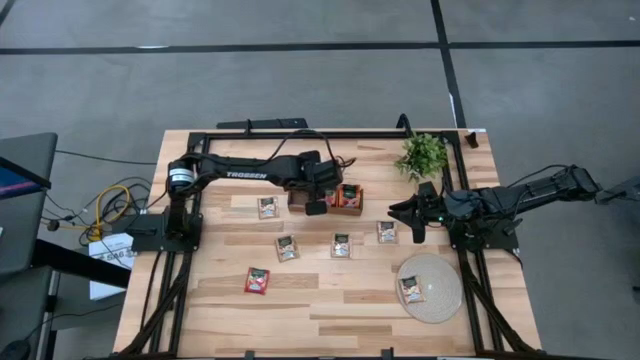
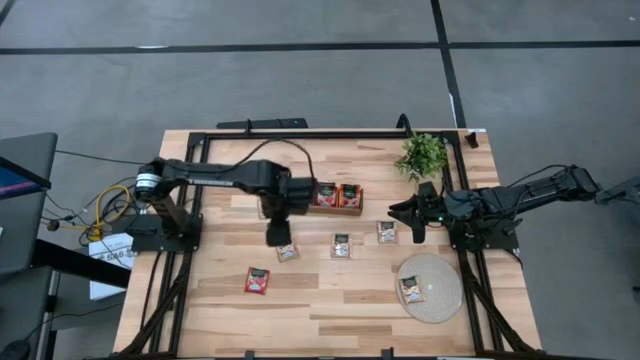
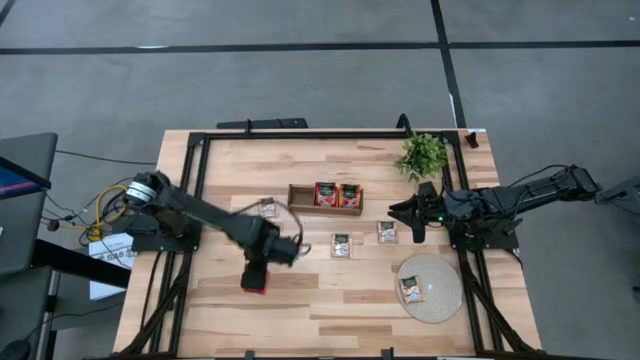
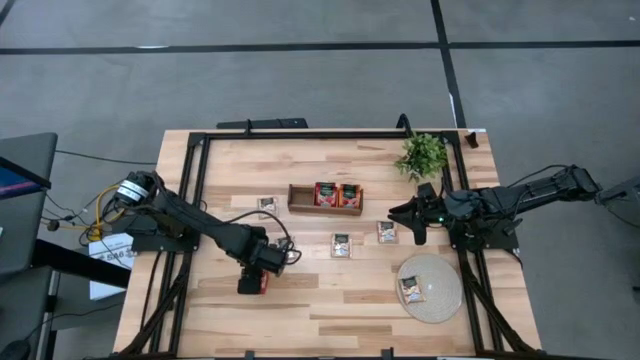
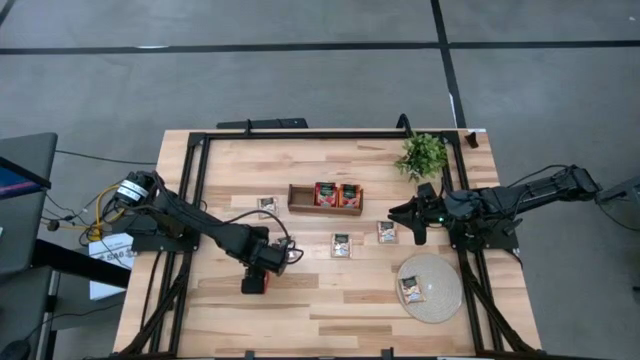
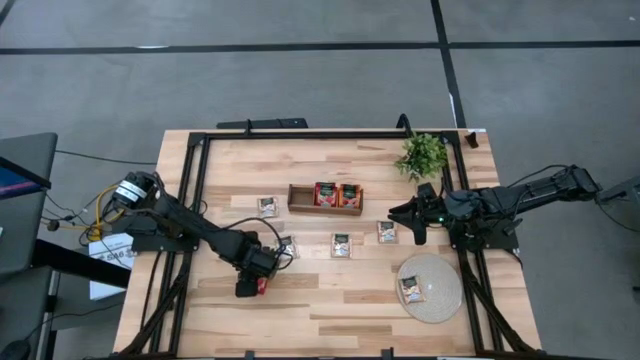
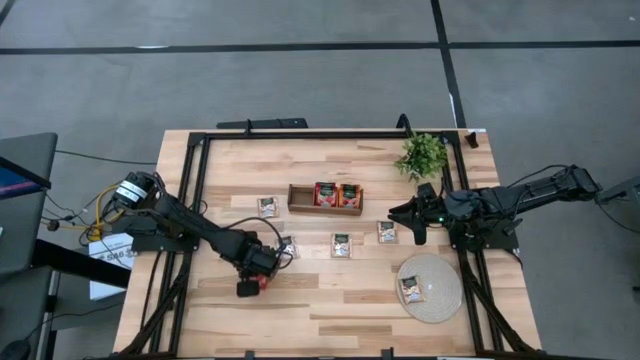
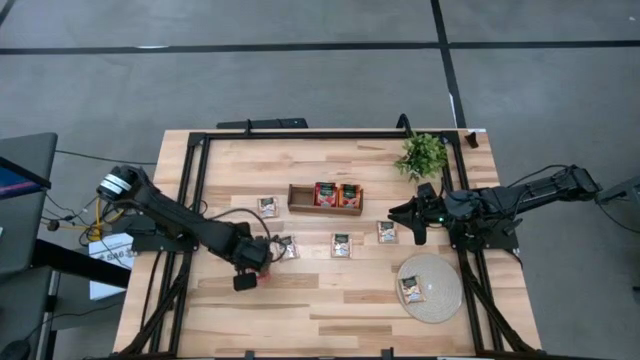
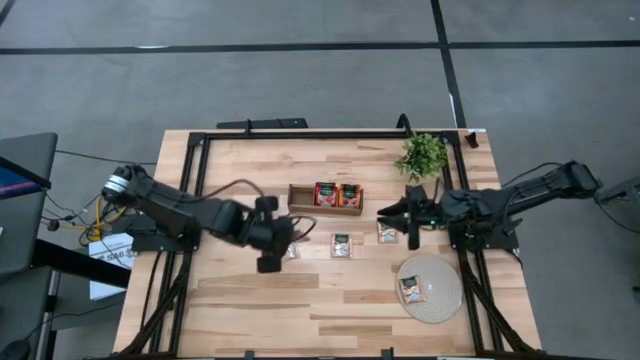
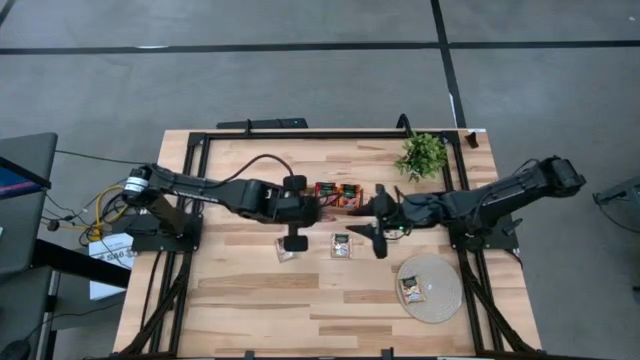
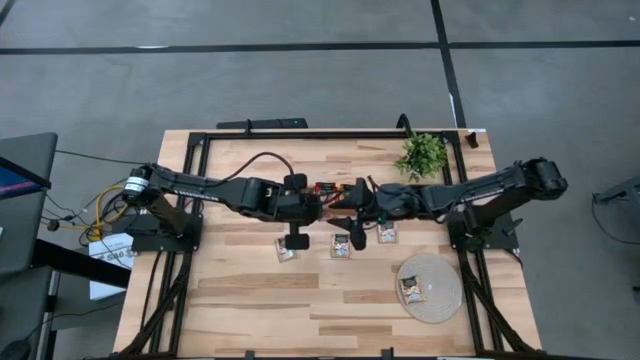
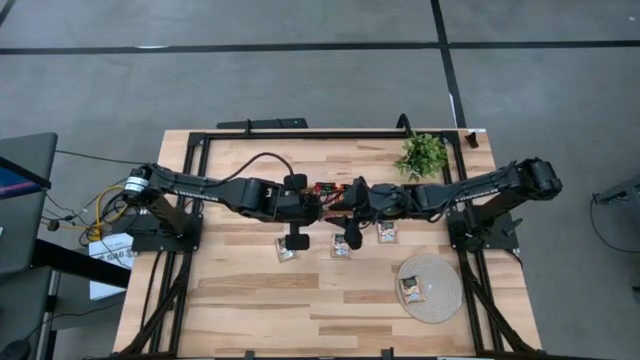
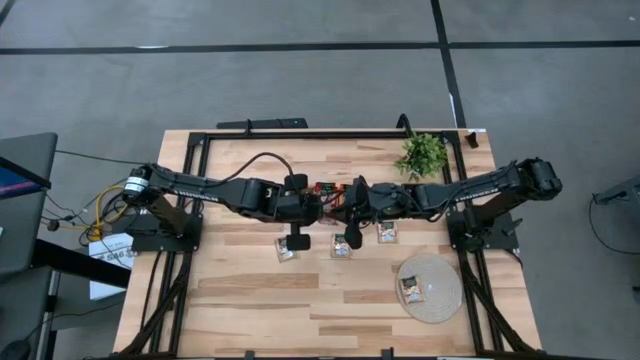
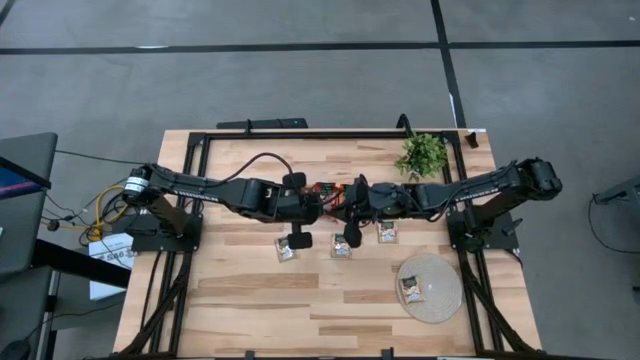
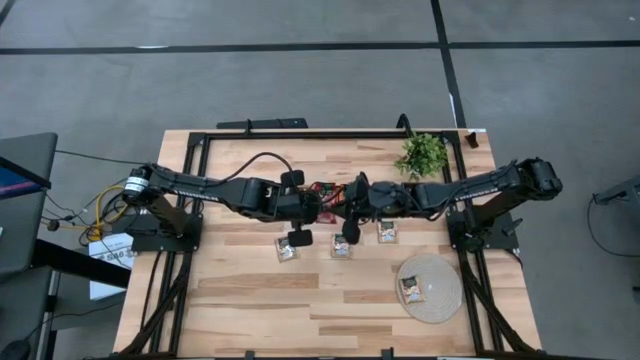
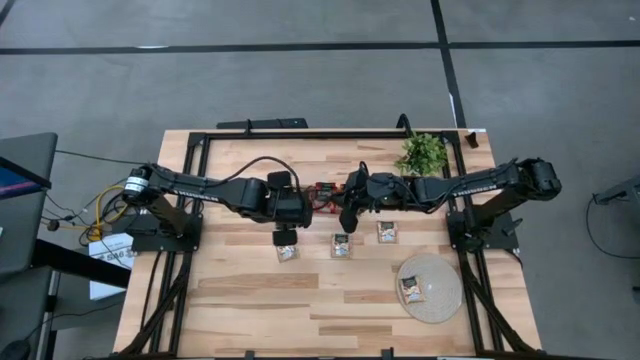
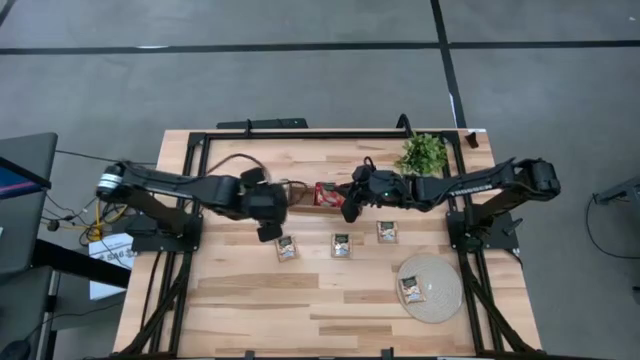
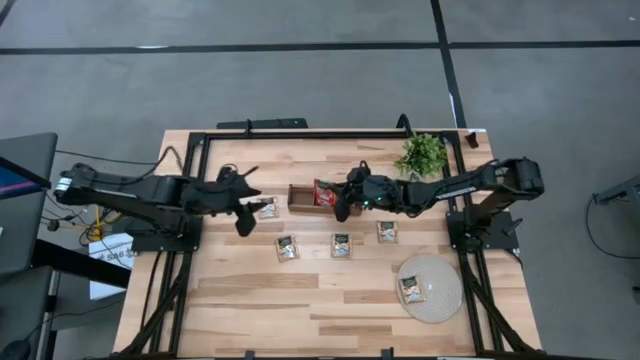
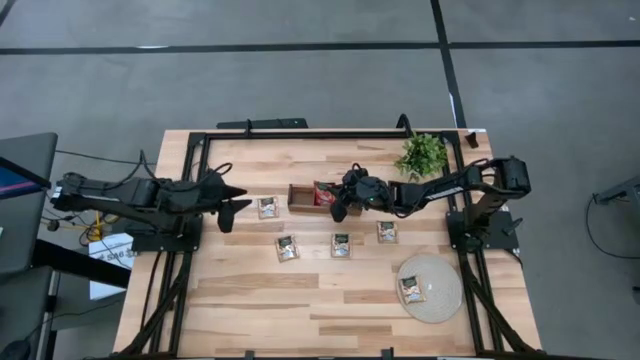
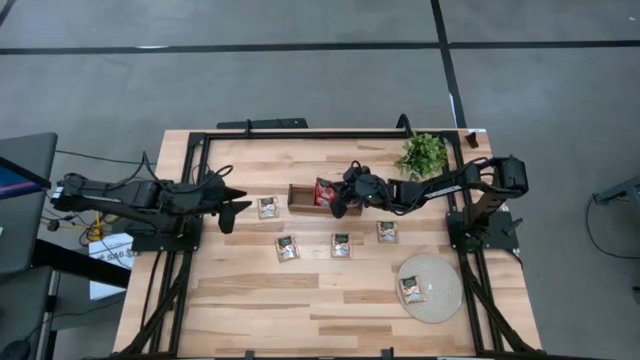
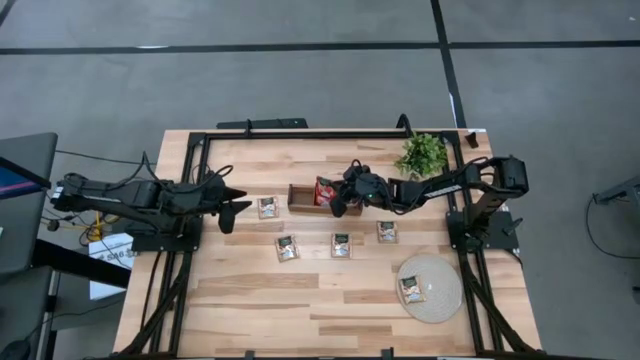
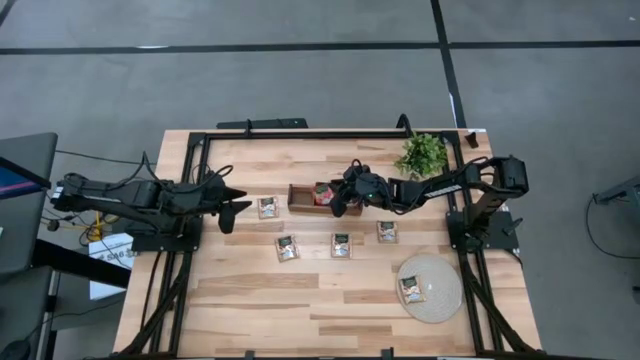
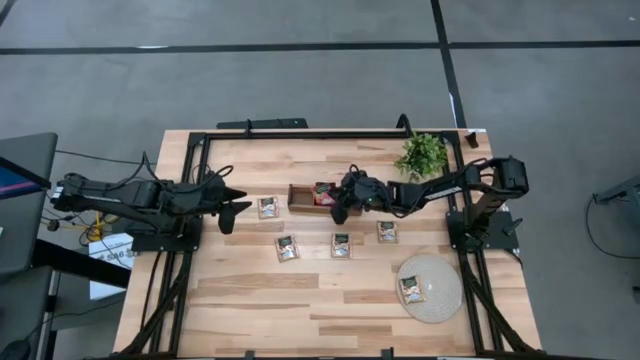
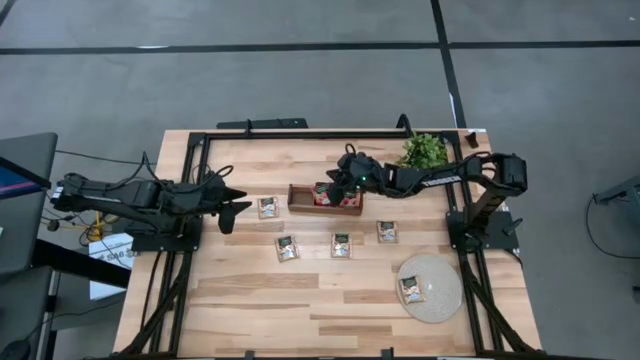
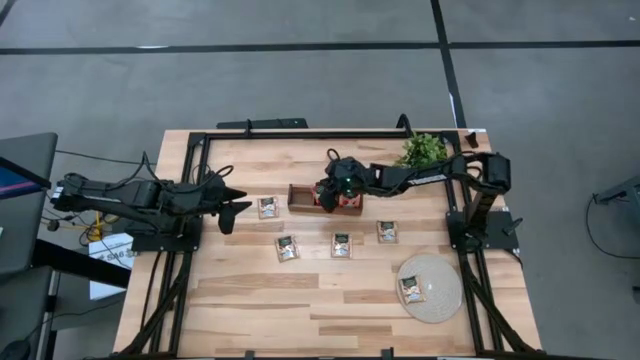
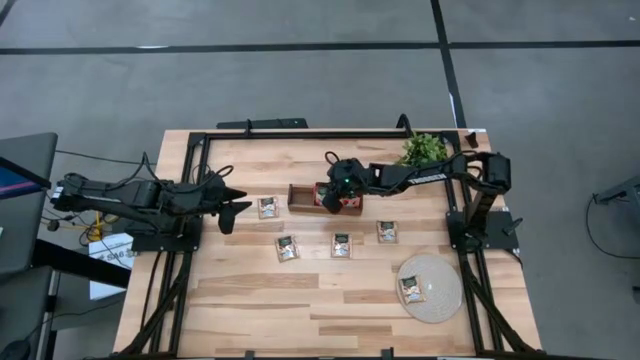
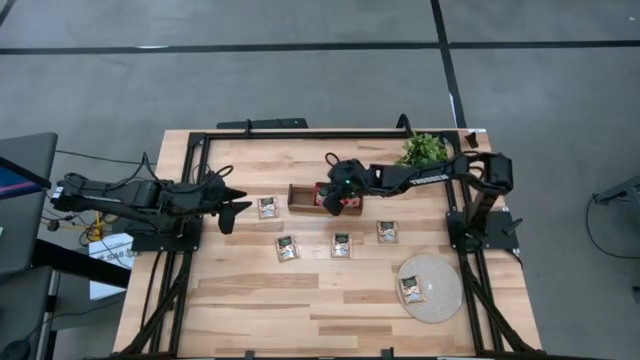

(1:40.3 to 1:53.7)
Task: Pick & Place Tea
Put the red tea bag into the middle section of the wooden organizer

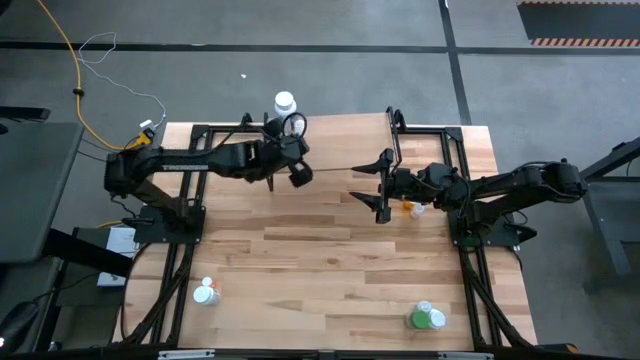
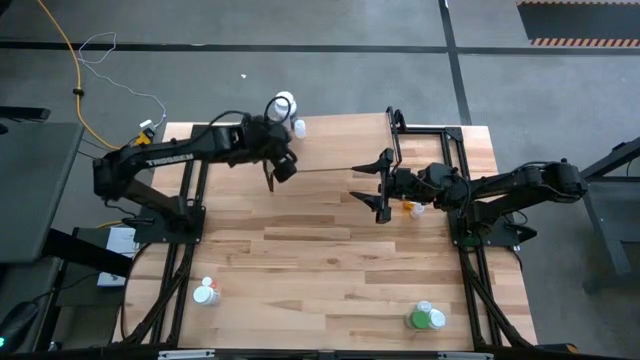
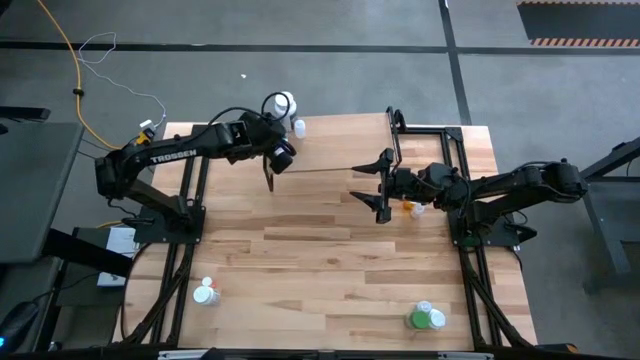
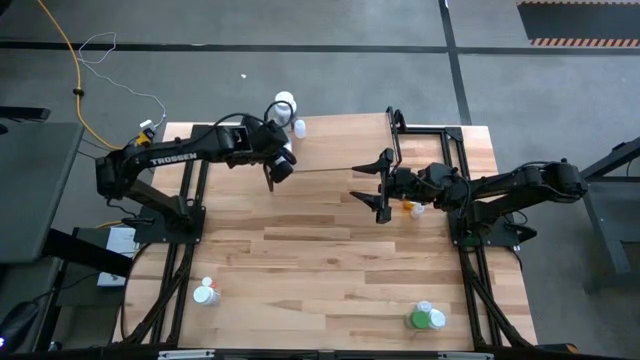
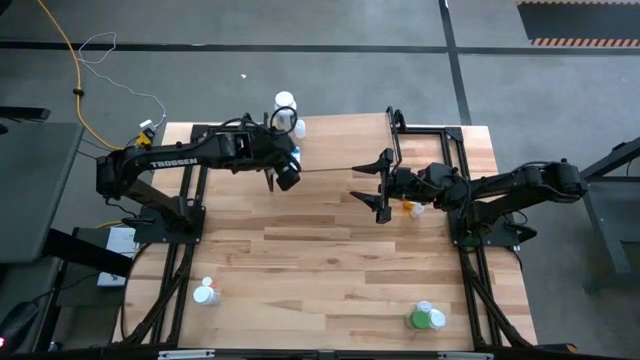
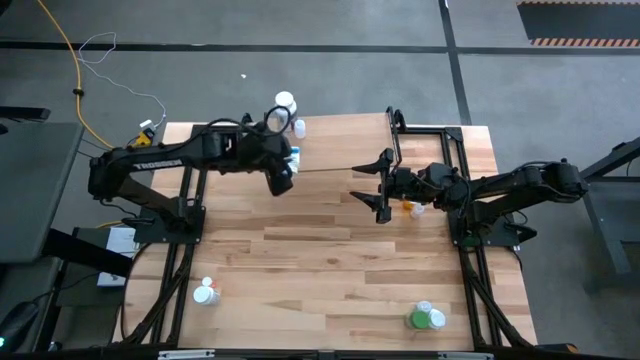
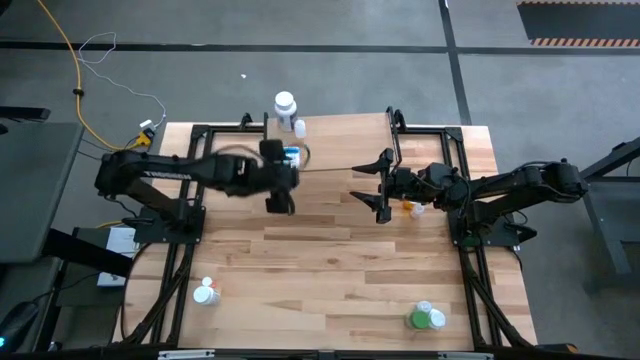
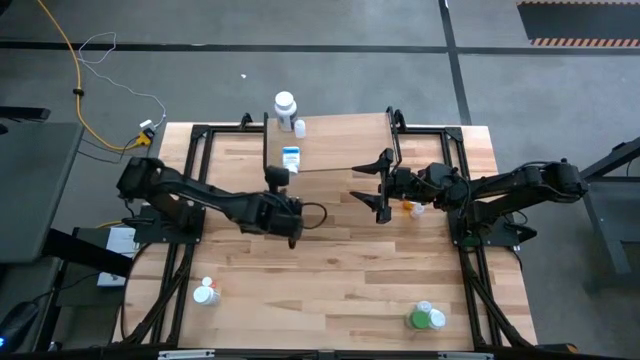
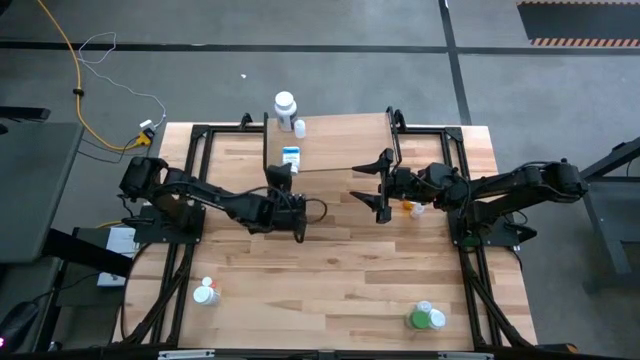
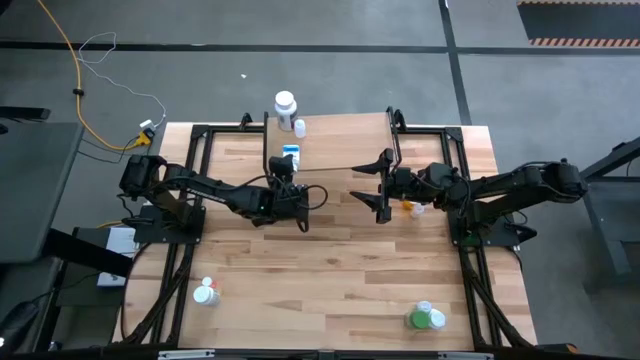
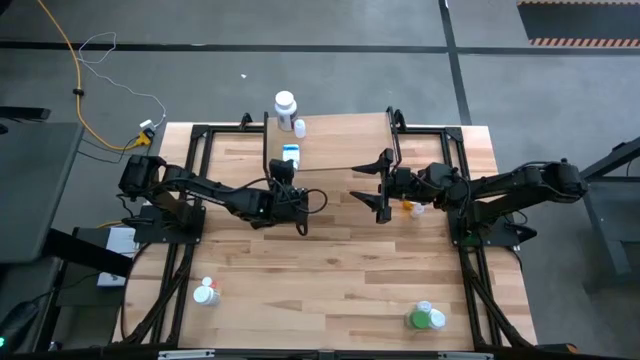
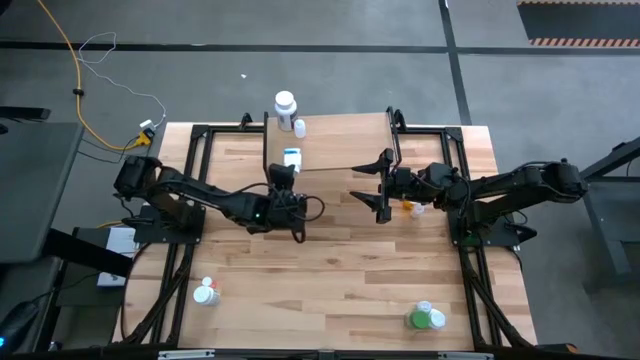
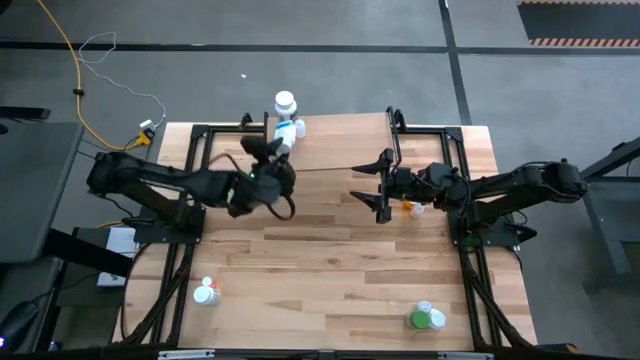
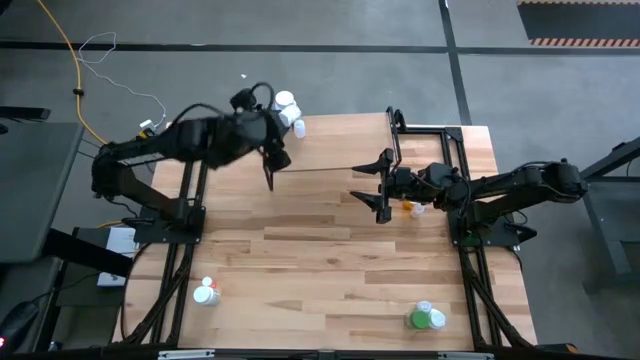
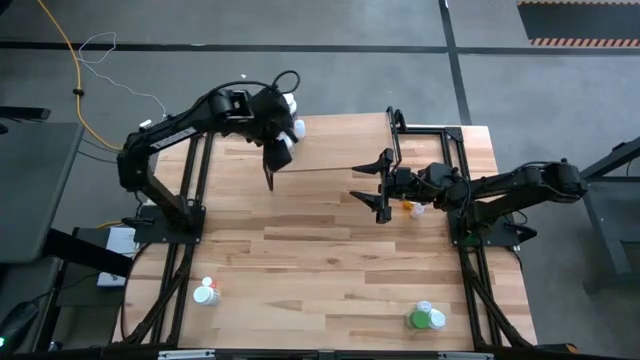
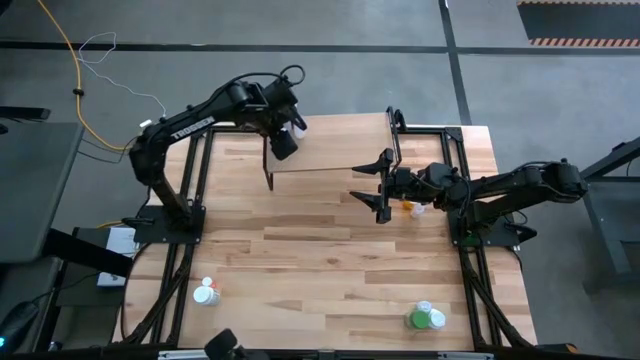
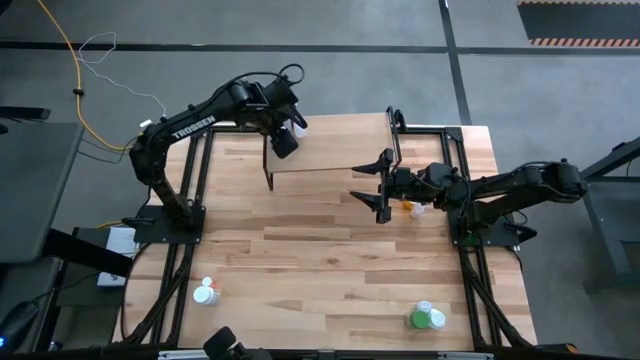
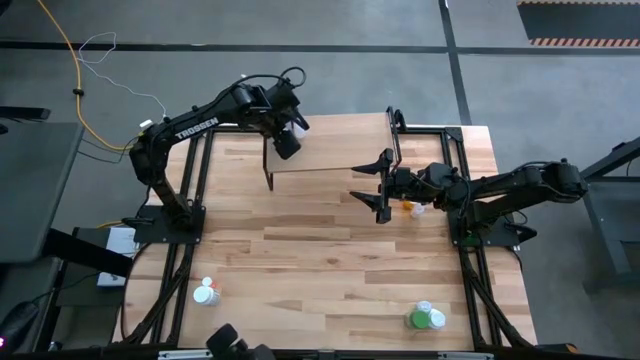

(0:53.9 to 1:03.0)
Task: Pick and place medicine bottles onto shelf by color
Adjust the white blue pill bottle on the shelf
